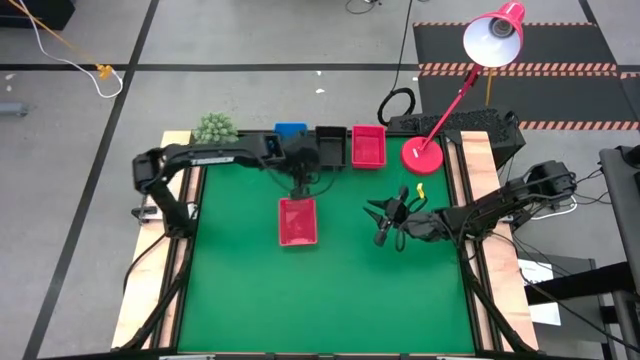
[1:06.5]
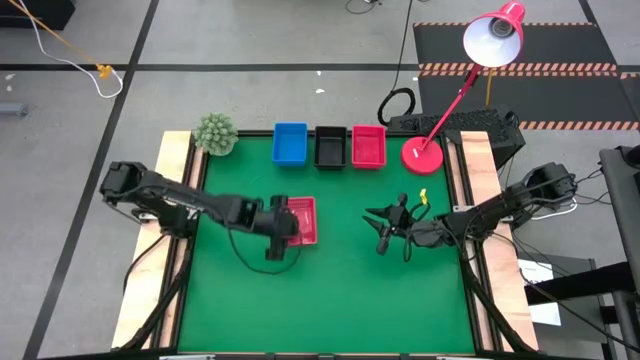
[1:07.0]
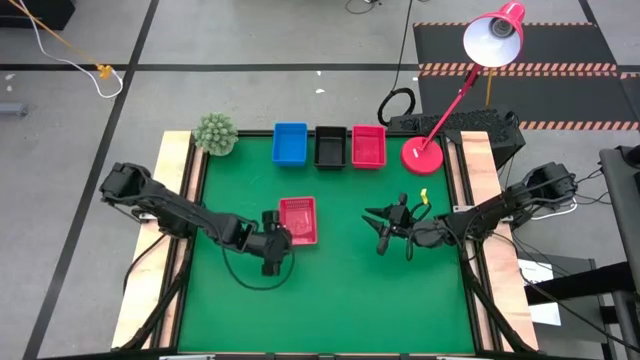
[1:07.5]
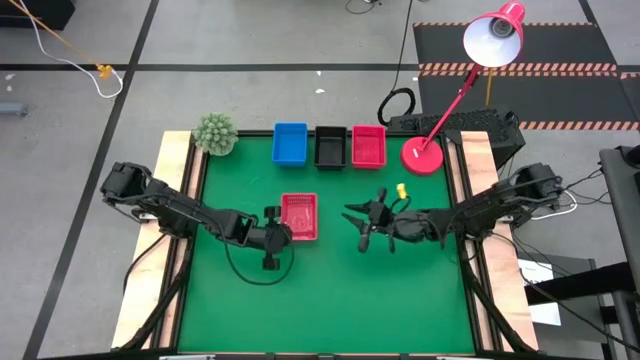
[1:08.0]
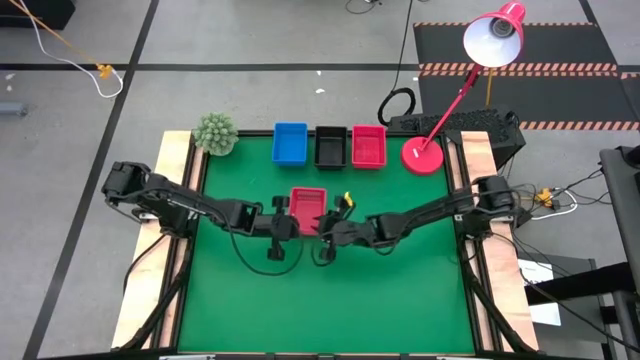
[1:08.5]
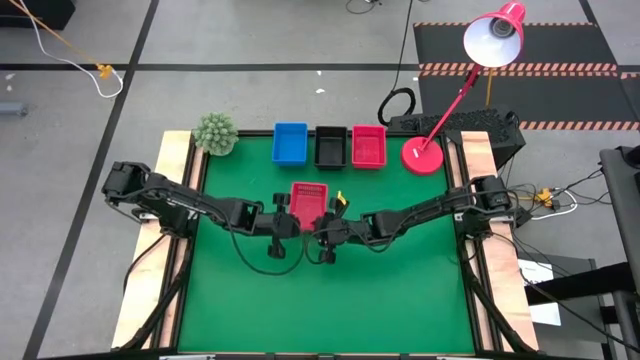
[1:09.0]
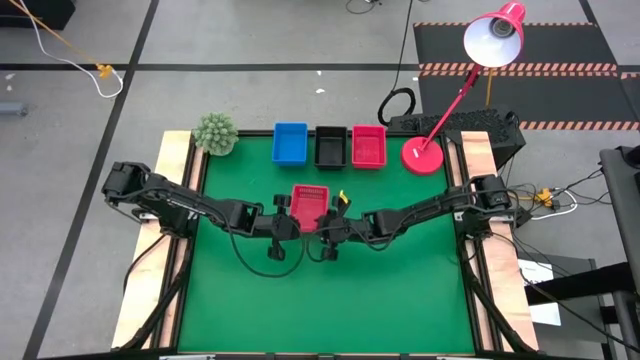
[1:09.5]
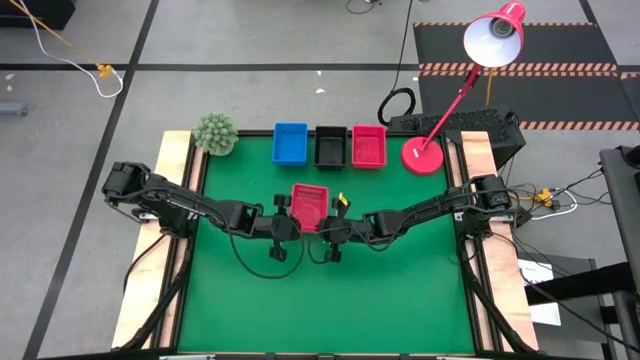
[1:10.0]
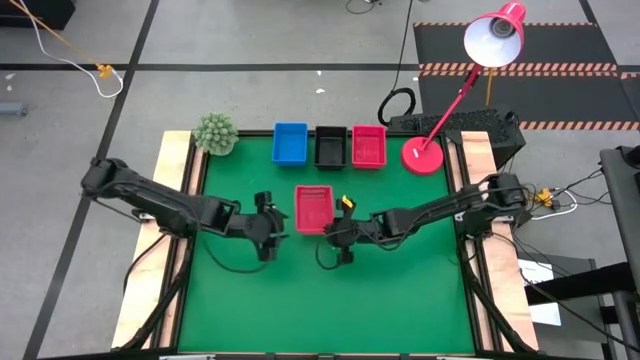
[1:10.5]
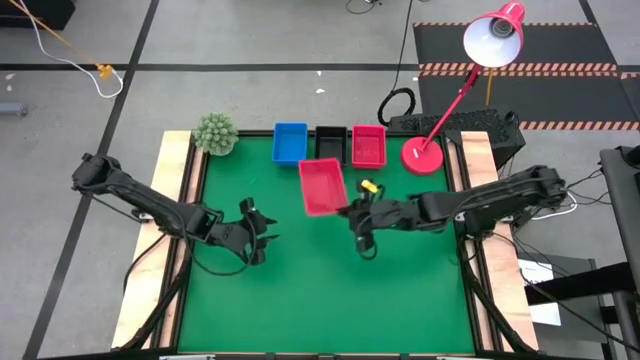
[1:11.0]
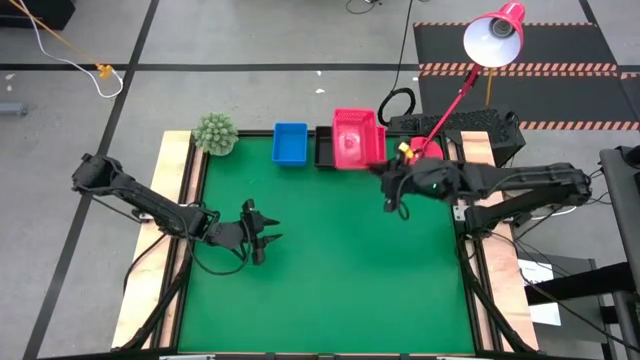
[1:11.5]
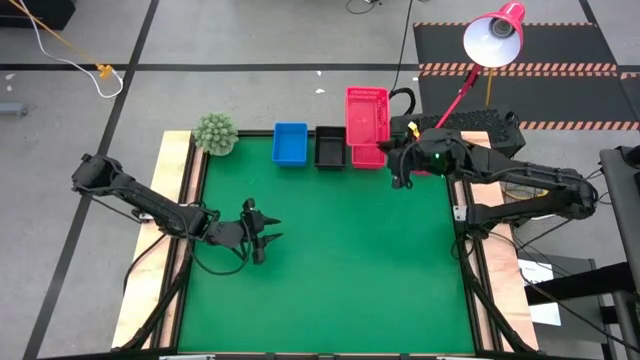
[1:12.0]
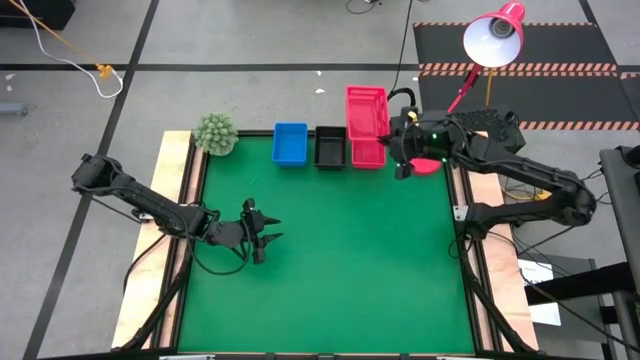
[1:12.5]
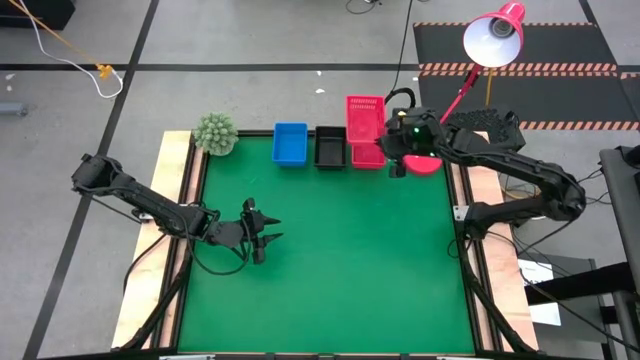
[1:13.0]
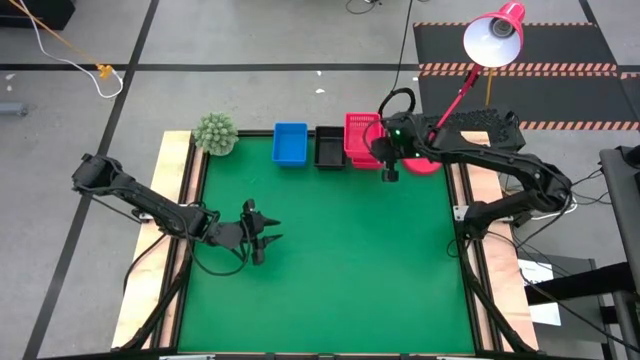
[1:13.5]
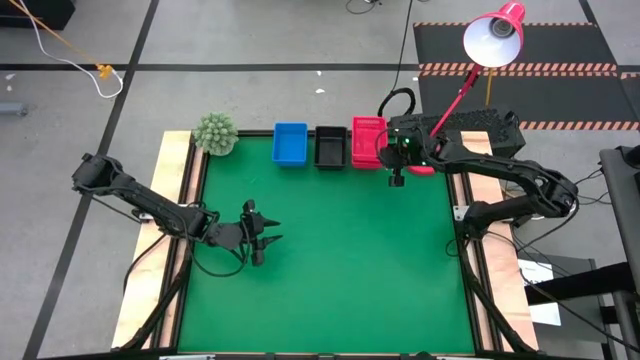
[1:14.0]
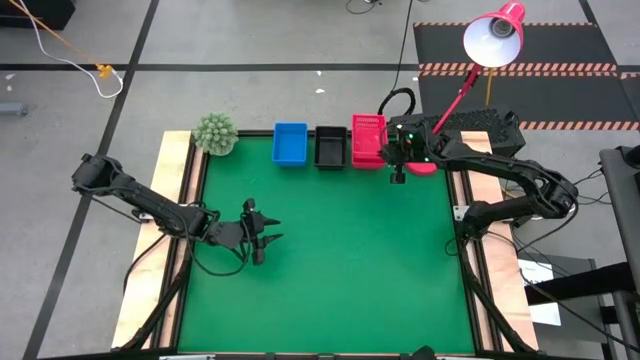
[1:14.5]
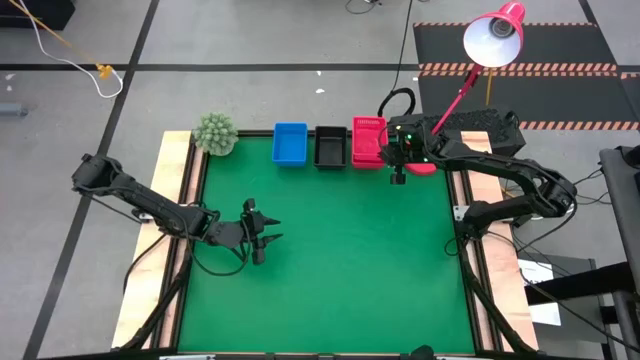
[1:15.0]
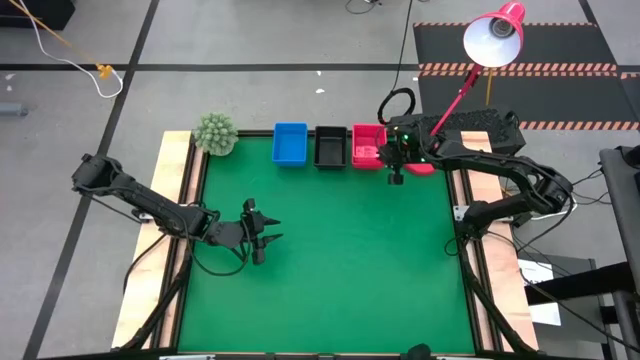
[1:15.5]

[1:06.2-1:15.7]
Stack the bottom red basket on the stacked top red basket

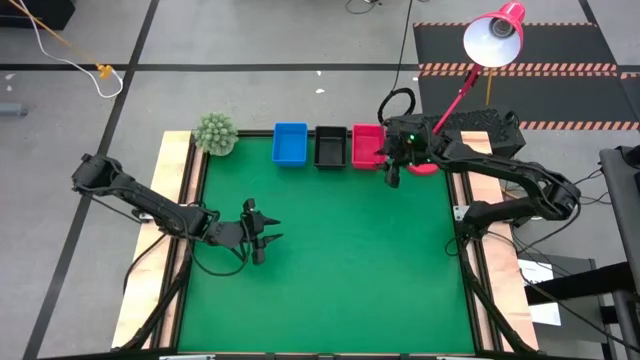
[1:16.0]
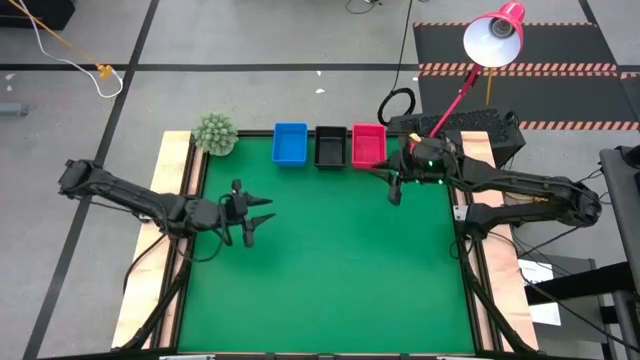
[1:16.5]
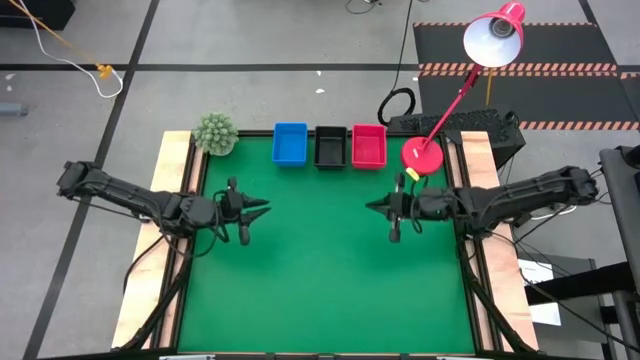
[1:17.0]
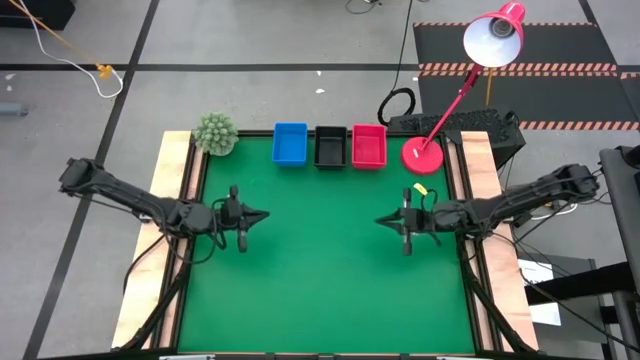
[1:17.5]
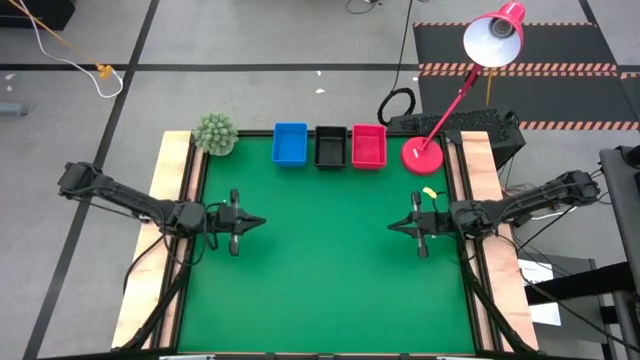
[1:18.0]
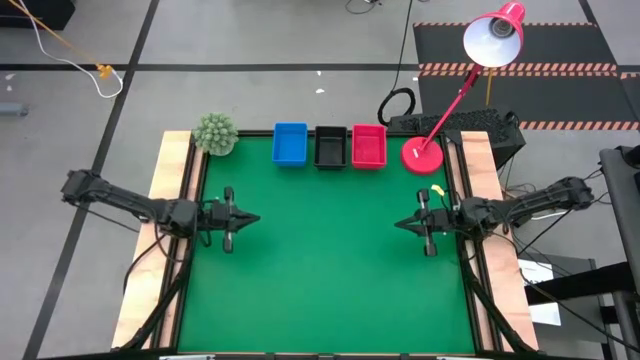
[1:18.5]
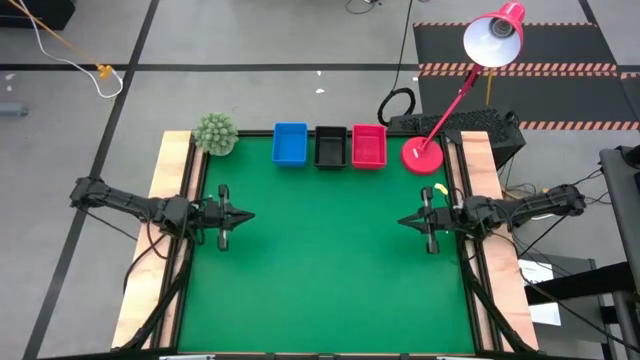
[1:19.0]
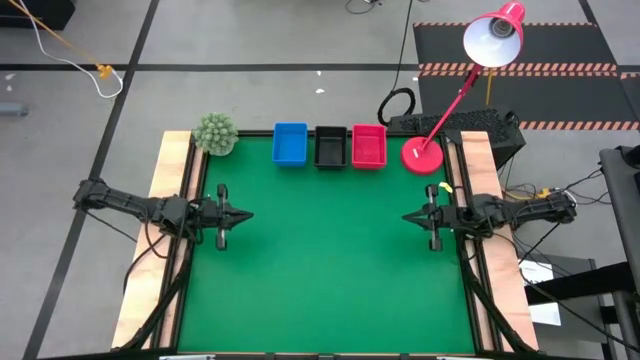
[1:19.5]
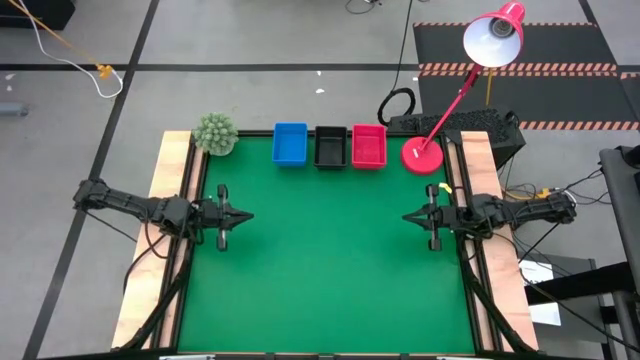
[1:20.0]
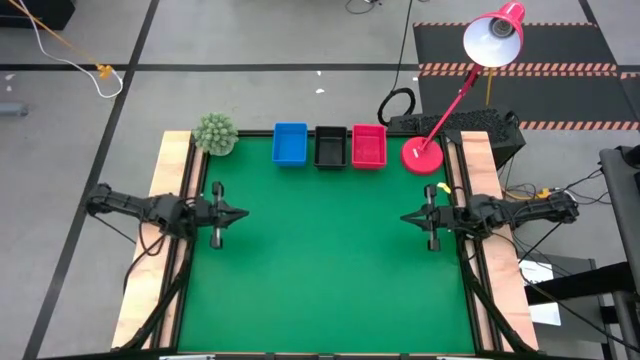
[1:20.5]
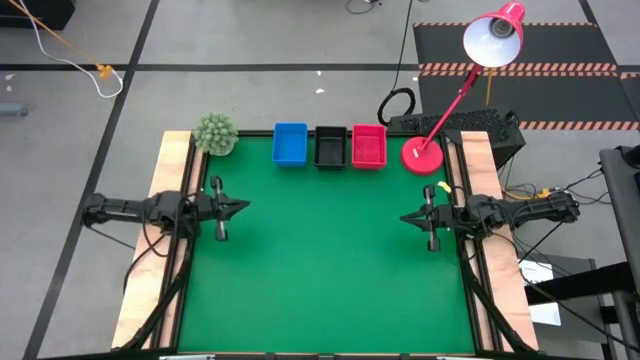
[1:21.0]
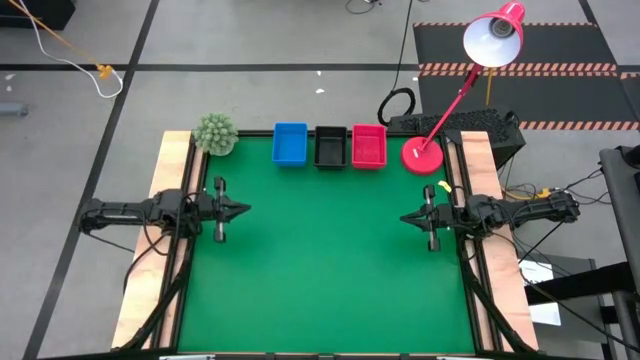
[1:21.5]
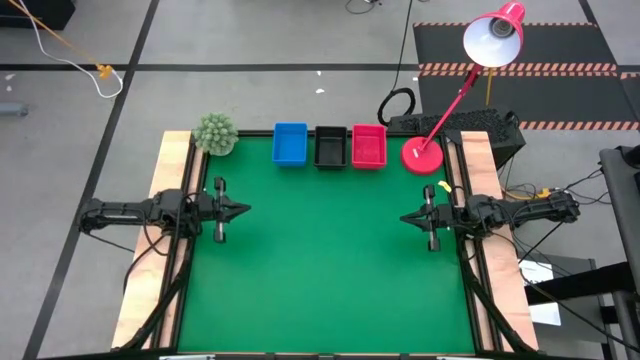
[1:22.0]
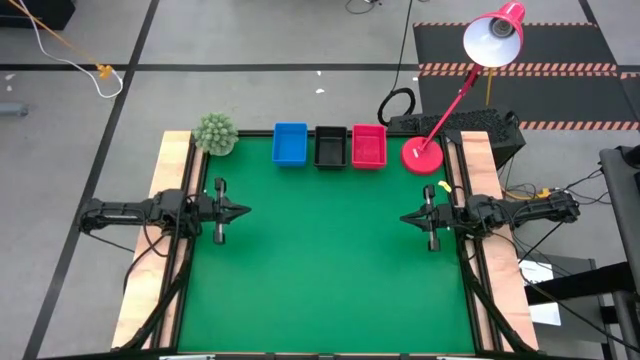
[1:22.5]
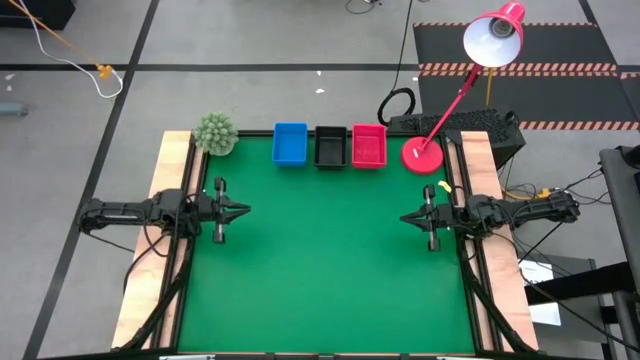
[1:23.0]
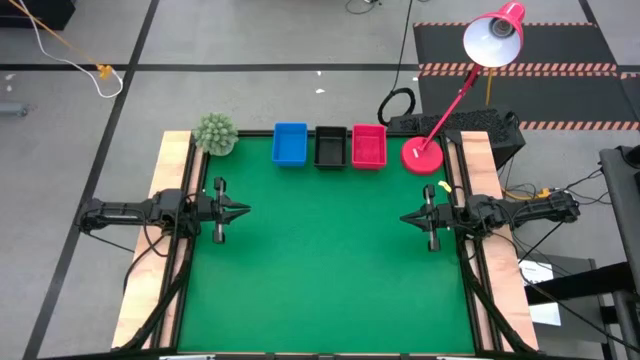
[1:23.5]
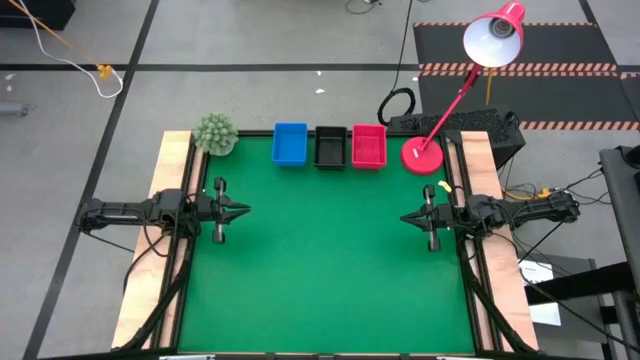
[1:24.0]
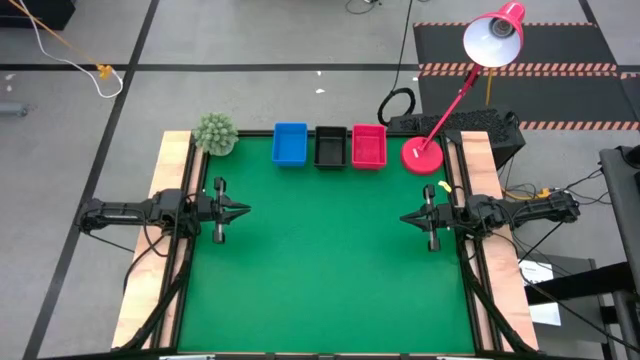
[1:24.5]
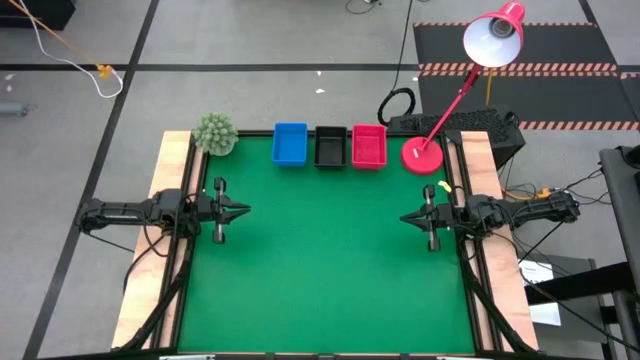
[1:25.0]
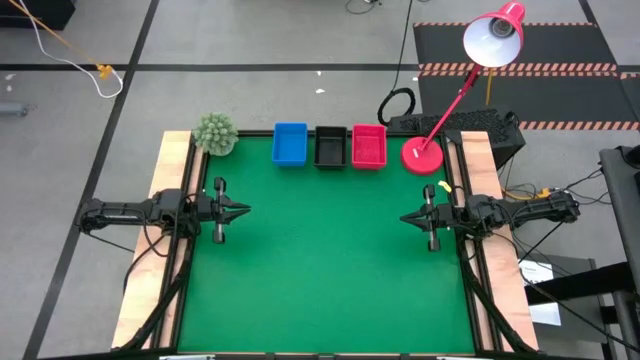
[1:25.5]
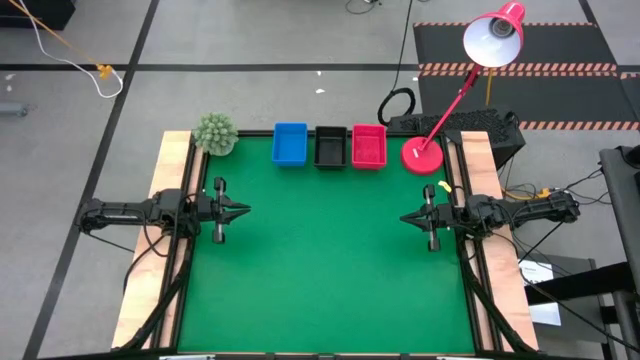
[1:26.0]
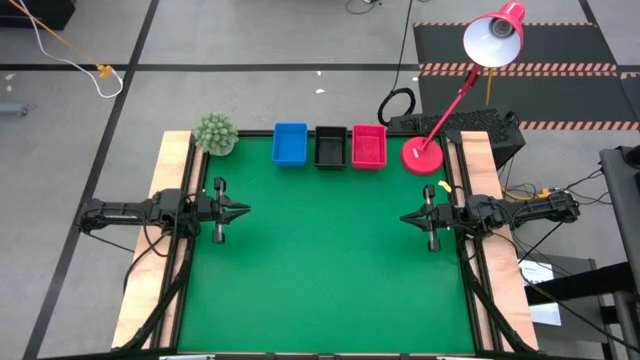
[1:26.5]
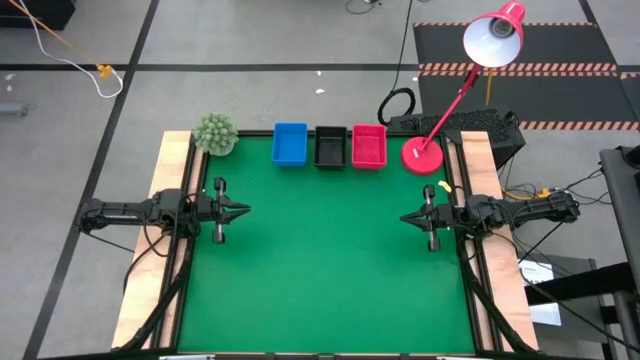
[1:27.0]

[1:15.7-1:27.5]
Return to Home Position
